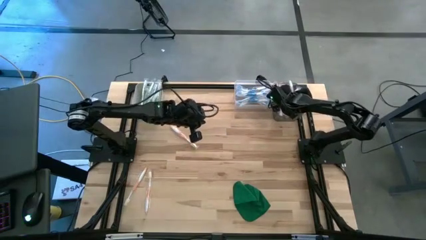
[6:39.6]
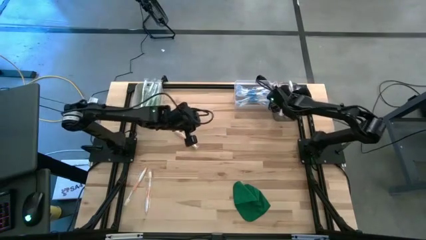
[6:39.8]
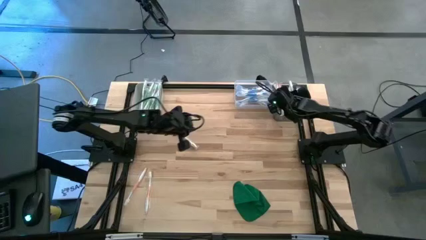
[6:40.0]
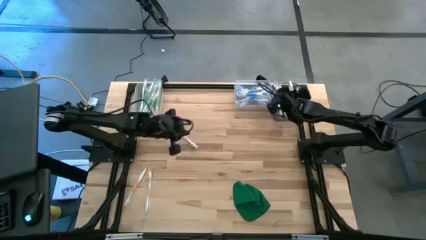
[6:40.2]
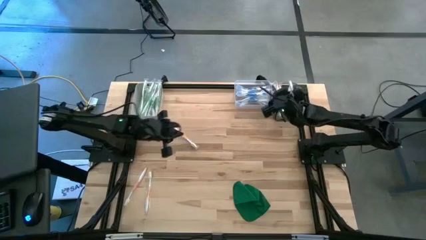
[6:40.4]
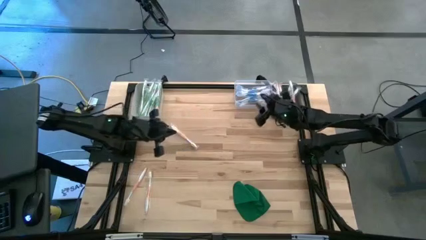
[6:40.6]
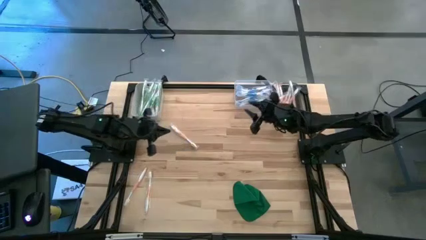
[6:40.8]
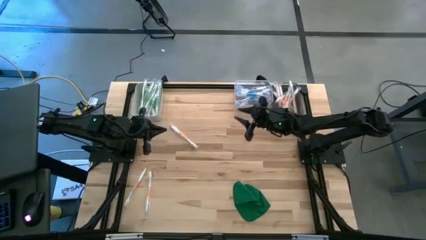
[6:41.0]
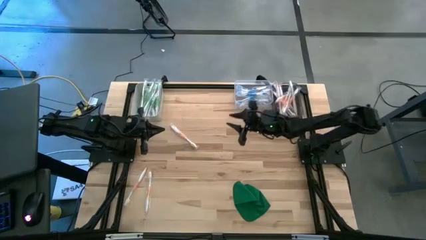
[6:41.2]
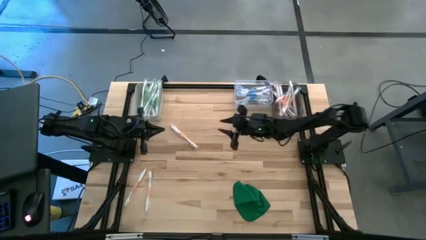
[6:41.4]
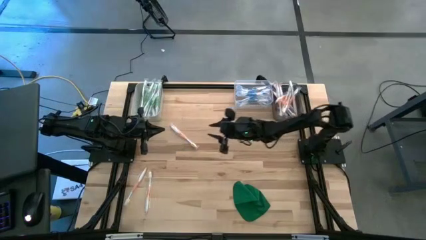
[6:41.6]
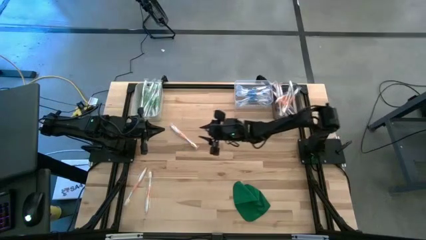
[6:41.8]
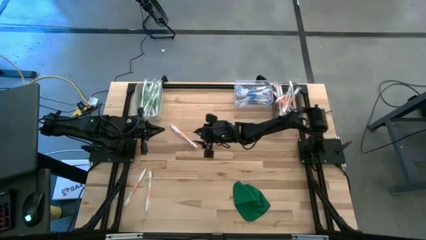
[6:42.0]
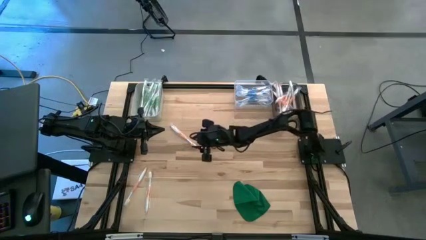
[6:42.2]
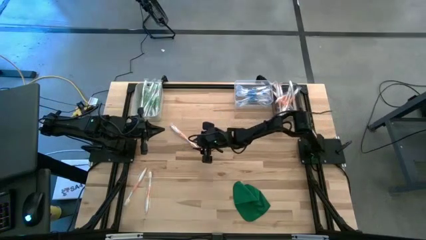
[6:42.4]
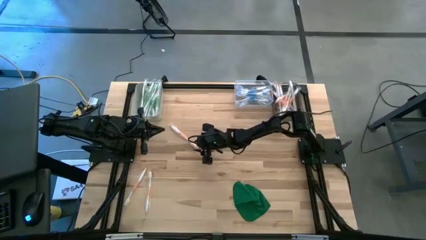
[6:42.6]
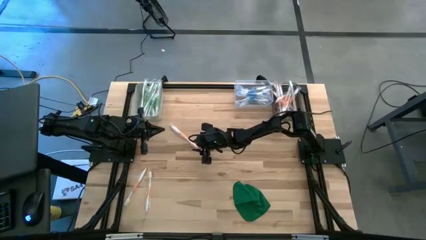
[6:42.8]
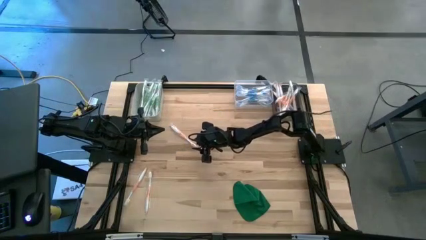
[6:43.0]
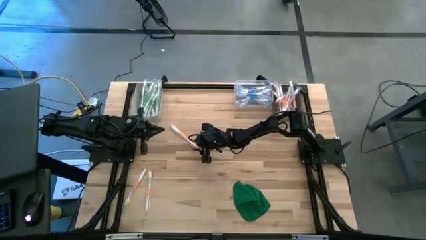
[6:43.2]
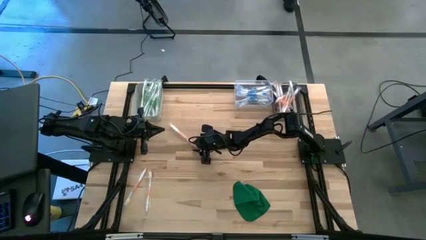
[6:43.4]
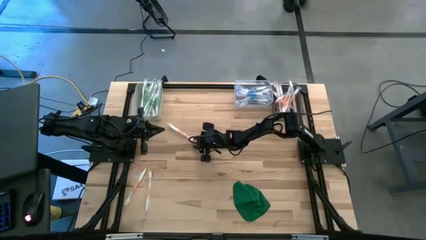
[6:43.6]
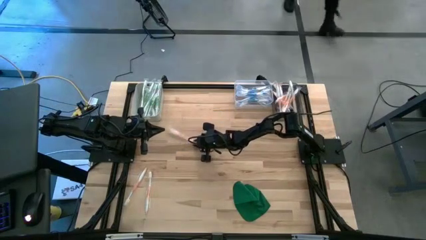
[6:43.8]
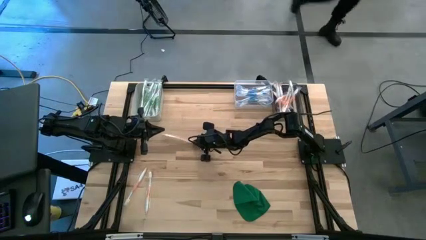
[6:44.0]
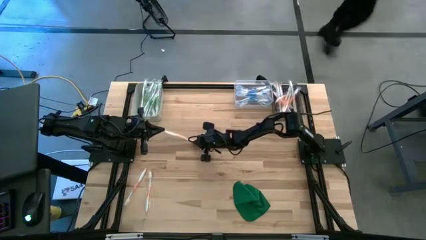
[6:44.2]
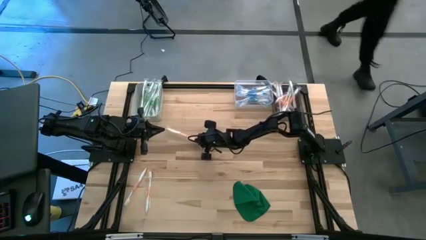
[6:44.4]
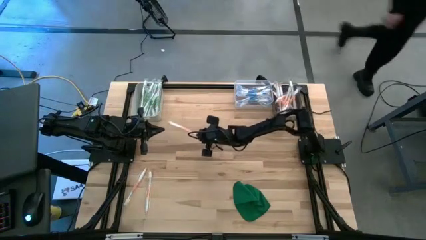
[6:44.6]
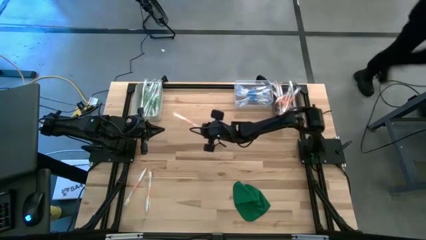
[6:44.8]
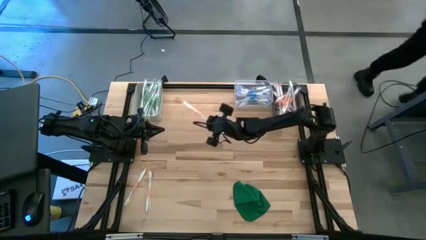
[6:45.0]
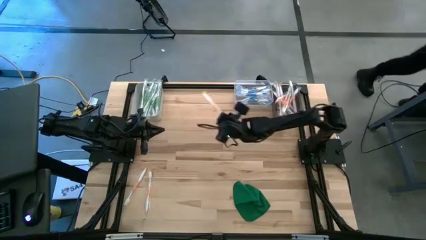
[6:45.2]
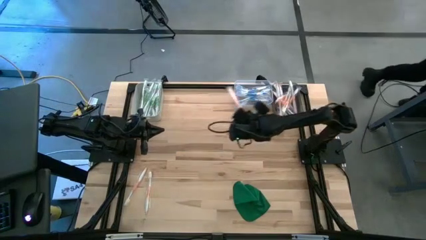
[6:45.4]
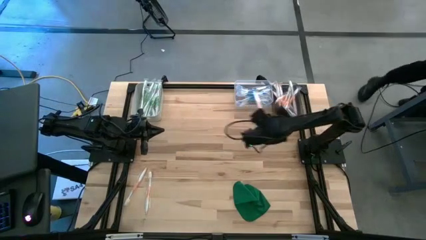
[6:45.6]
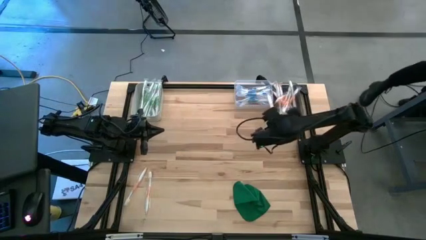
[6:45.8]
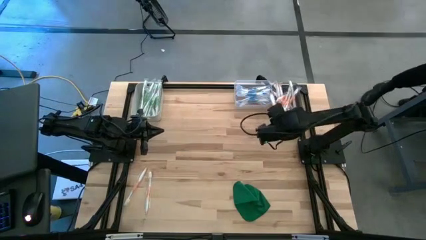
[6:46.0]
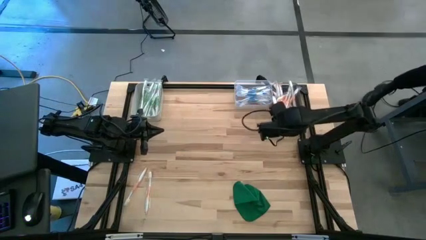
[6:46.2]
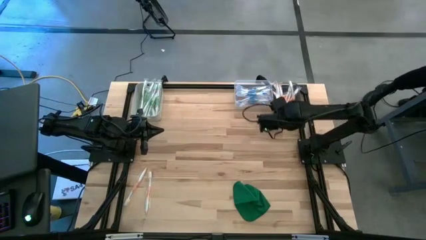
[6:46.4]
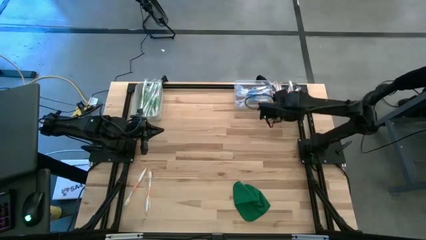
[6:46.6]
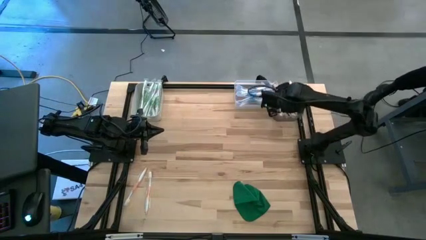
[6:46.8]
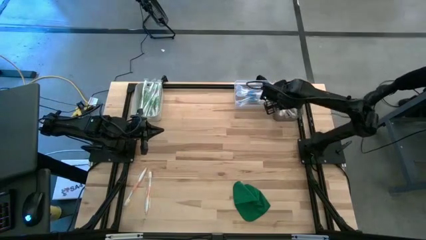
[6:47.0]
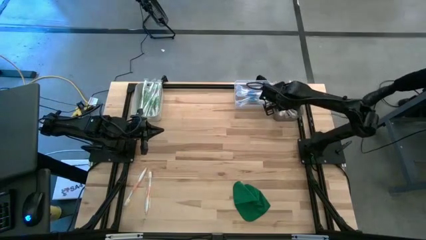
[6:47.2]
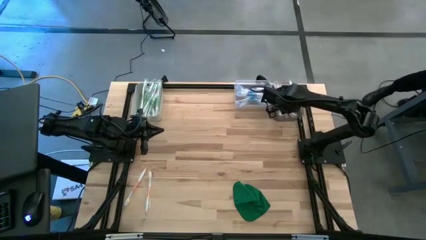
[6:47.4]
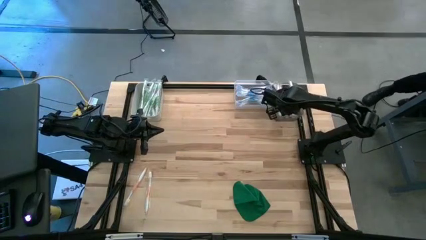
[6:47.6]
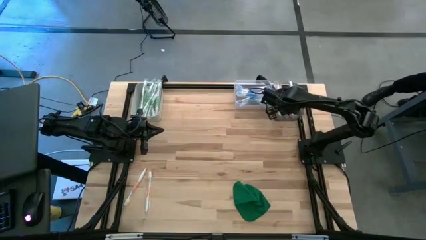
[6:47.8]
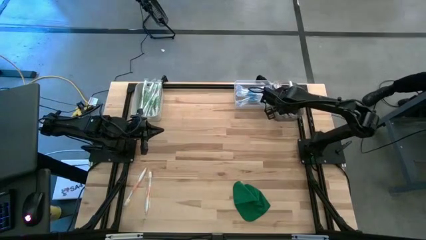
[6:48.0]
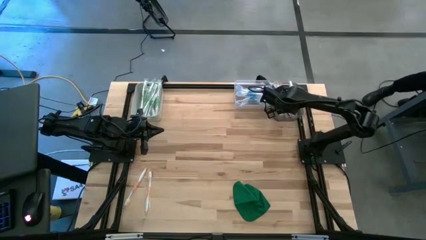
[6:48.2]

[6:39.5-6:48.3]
Task: Pick & Place Toothbrushes
Put the orange toothbrush into the black bin
